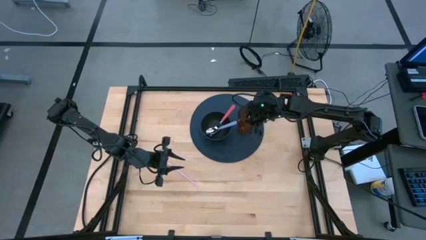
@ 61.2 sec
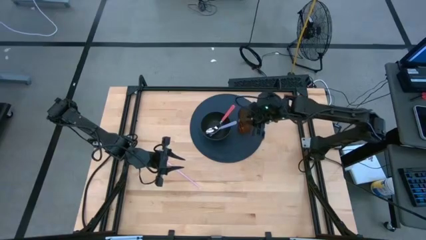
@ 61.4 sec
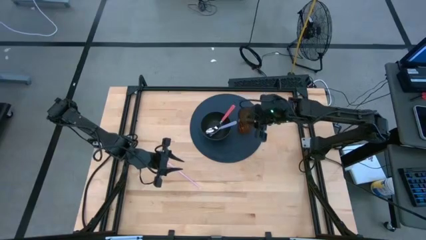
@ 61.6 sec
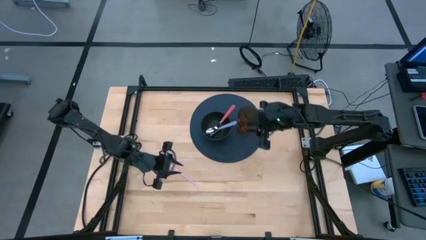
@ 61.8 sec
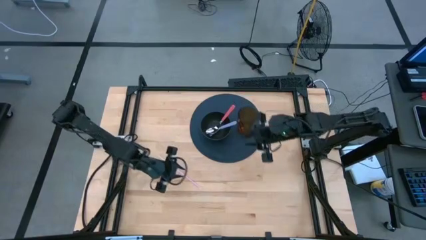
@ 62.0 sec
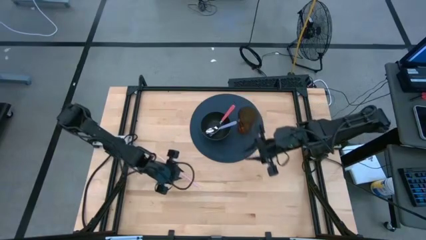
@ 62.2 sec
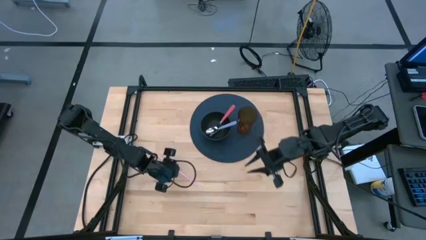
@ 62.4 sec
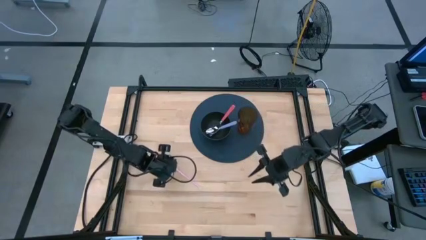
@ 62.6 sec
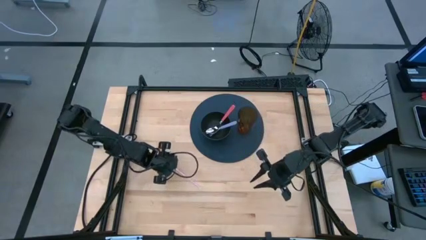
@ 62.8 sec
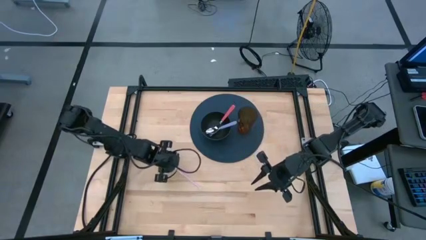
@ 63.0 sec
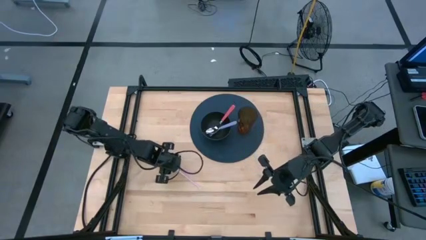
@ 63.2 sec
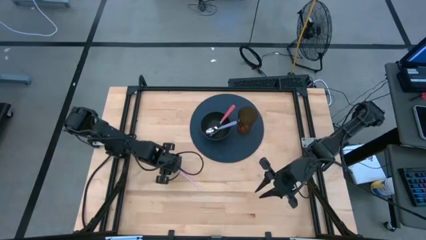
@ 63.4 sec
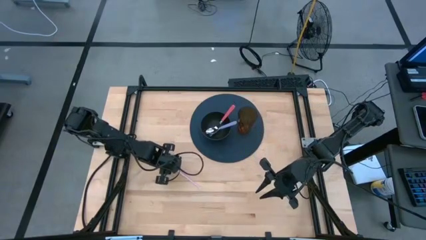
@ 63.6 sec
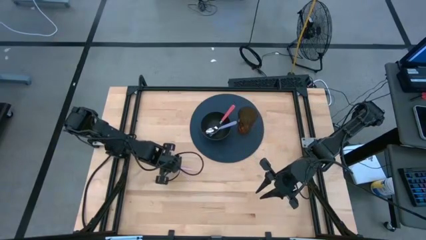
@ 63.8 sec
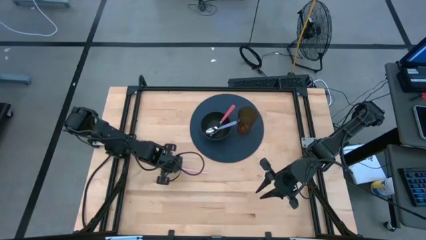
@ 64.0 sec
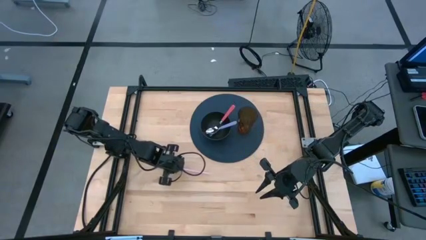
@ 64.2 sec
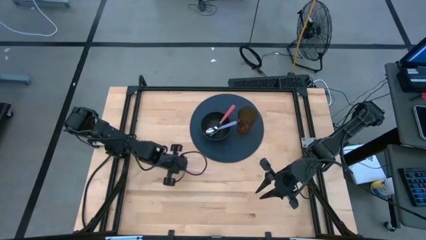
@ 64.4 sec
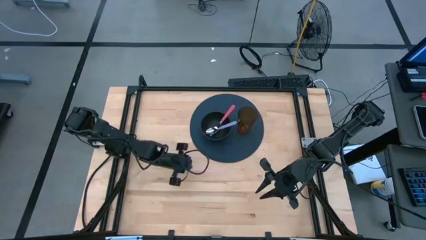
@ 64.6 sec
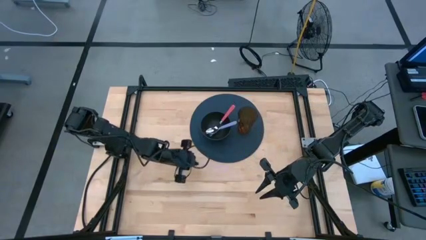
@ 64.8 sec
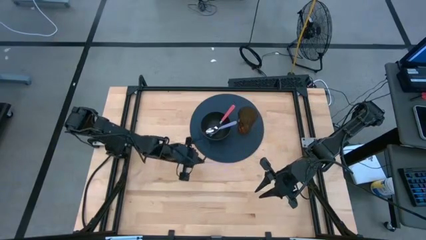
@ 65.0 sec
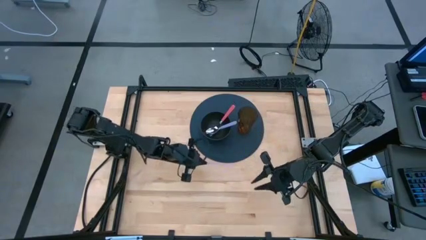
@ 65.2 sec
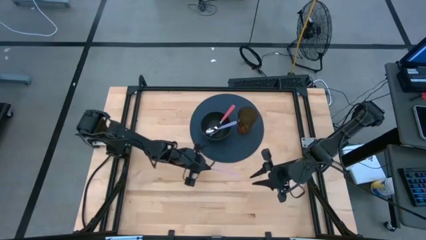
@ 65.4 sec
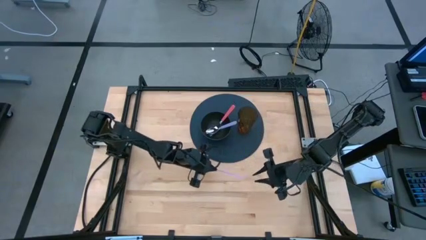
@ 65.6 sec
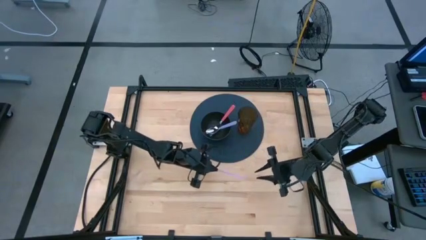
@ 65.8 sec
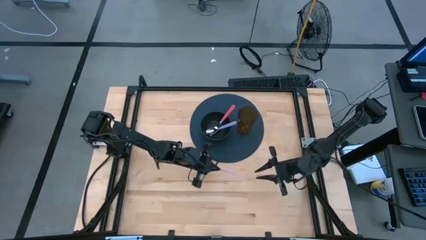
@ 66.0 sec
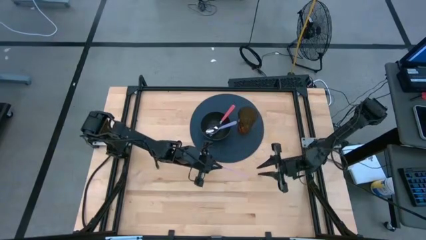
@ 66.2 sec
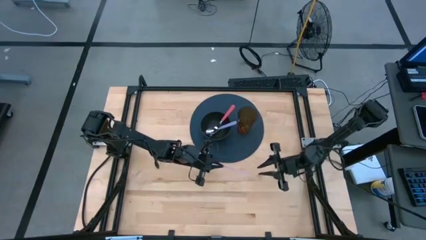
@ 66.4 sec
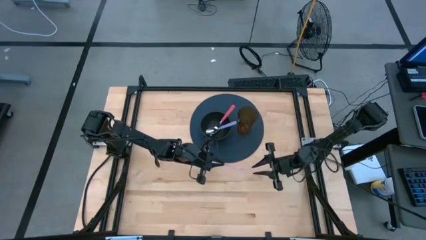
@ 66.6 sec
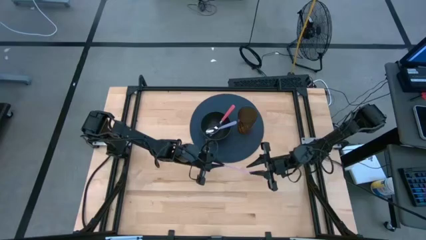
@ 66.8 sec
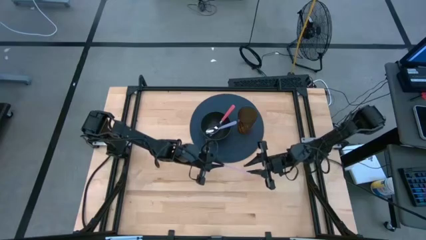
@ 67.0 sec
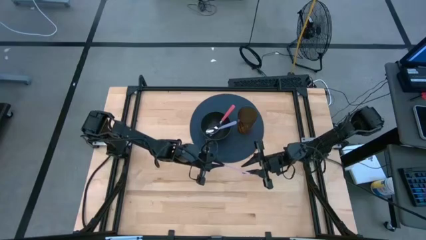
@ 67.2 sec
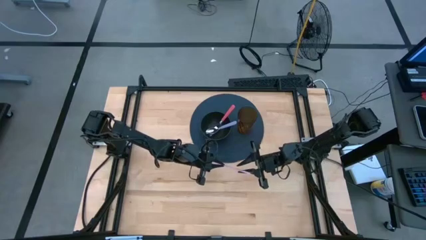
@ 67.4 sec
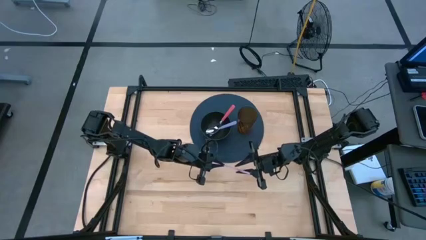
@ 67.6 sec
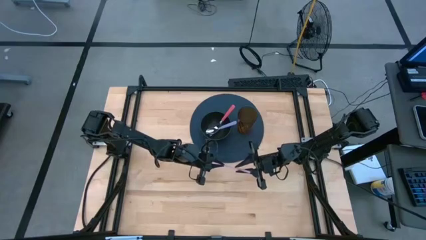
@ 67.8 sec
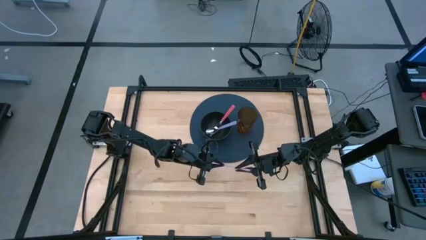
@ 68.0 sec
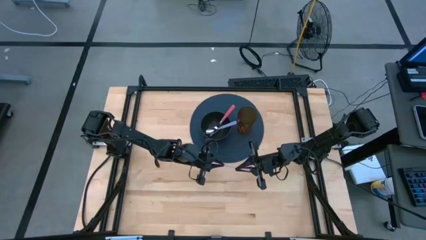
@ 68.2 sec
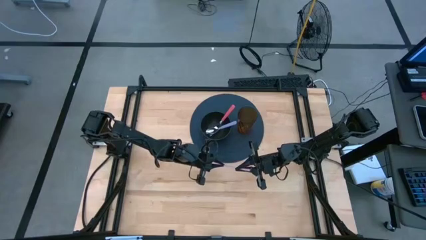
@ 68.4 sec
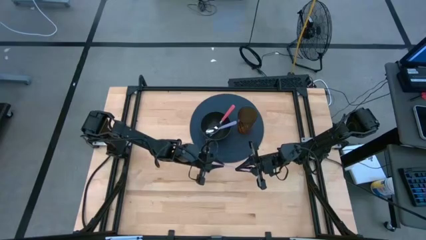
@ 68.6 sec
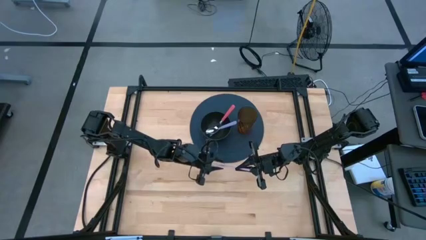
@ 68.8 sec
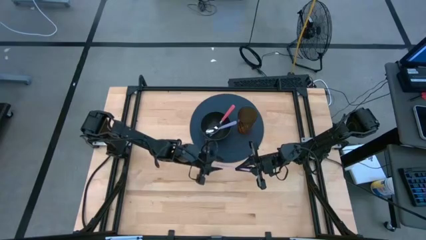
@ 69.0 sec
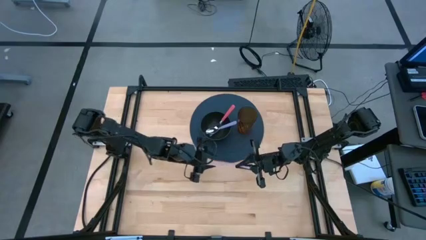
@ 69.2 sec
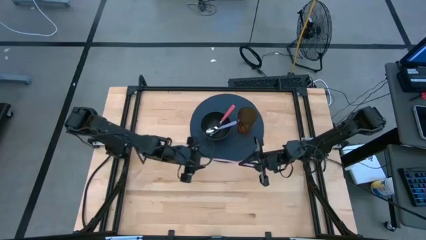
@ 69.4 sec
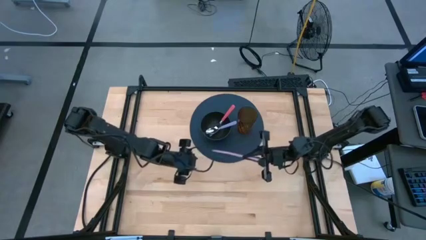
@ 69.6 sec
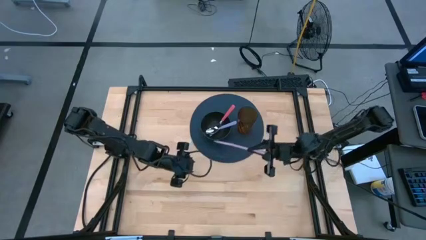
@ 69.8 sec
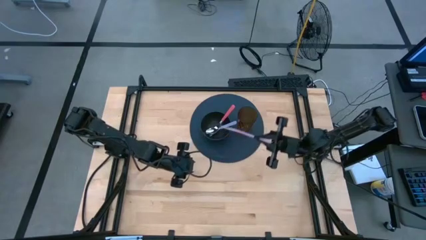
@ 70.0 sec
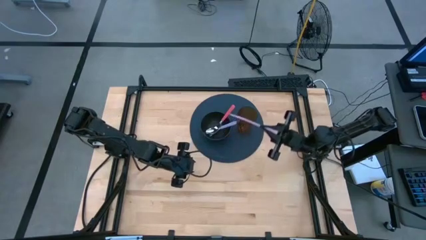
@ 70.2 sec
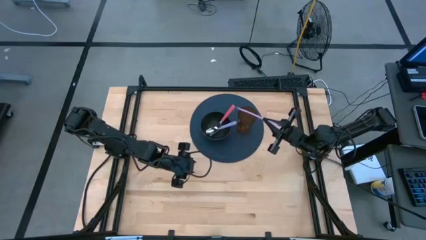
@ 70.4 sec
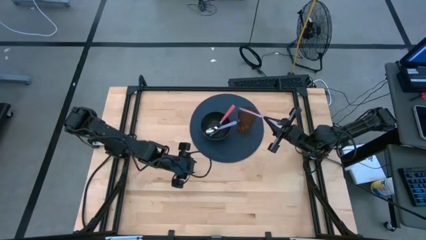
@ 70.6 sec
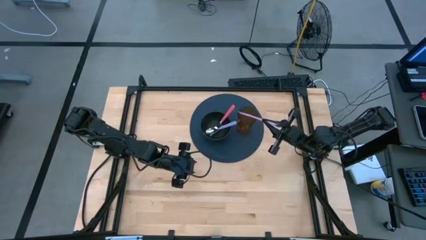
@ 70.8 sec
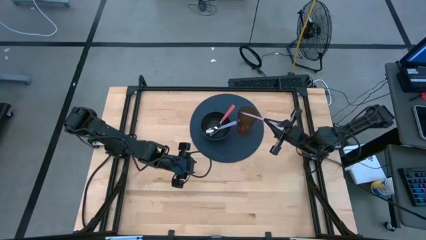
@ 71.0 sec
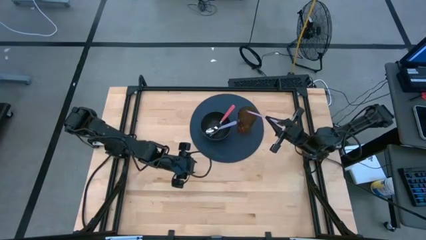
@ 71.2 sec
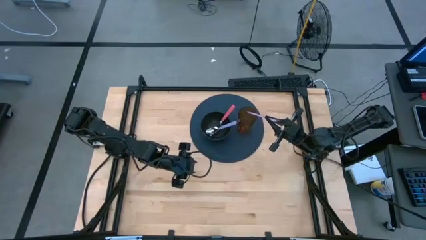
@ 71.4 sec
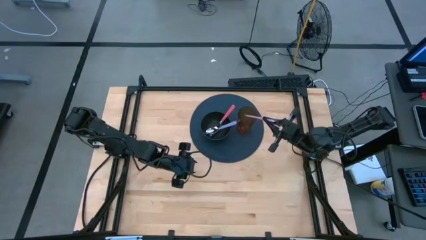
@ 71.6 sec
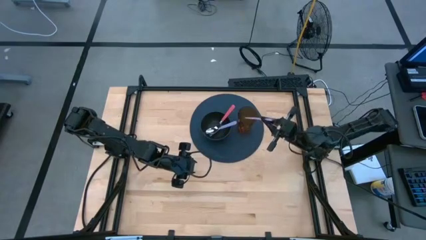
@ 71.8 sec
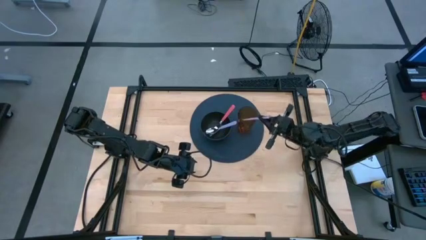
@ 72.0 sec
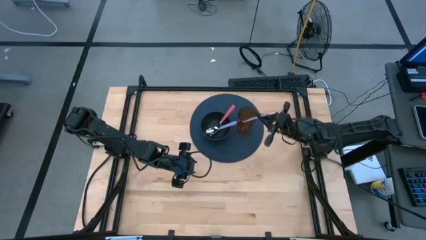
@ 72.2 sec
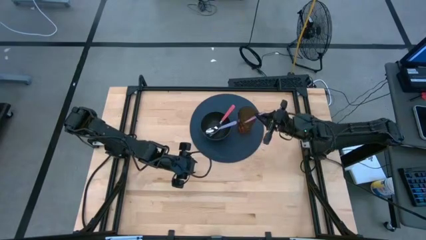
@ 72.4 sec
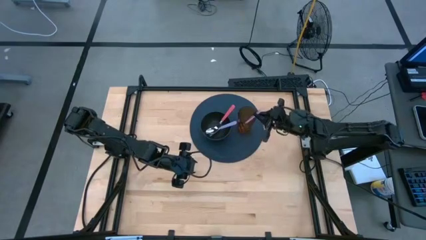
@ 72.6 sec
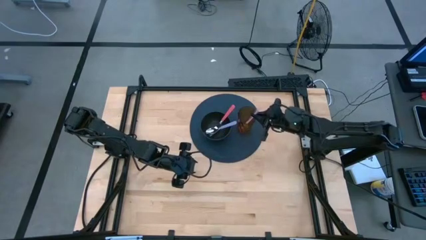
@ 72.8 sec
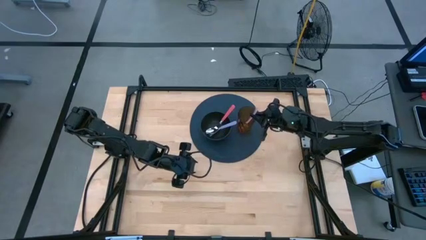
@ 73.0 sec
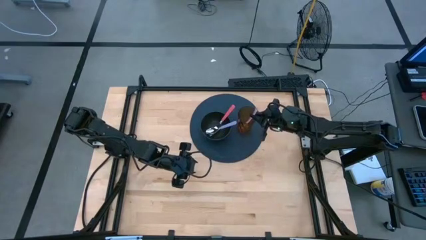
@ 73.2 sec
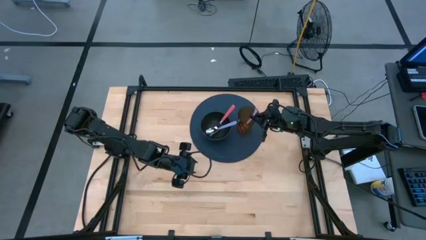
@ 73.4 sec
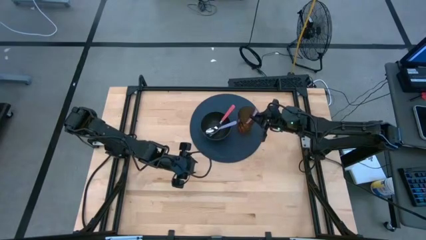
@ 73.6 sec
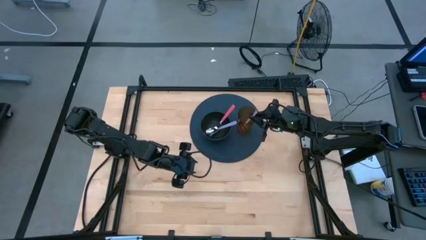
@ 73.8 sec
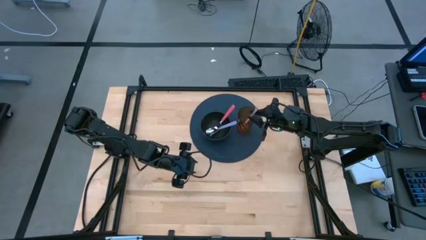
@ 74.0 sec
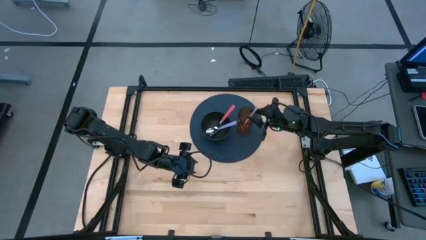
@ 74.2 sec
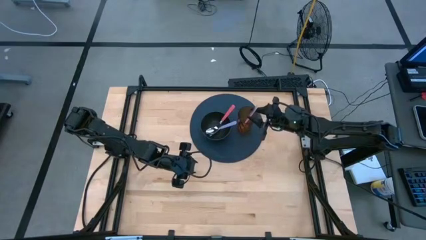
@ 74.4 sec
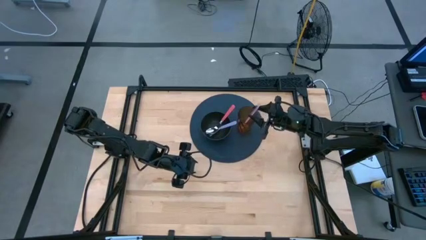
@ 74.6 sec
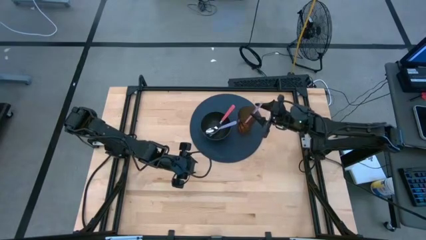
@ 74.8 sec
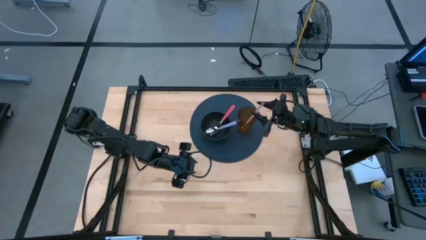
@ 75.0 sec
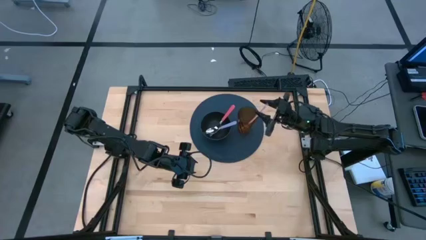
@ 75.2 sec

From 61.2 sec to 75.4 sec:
Task: Pick & Place Utensil
Put the straw into the cup
